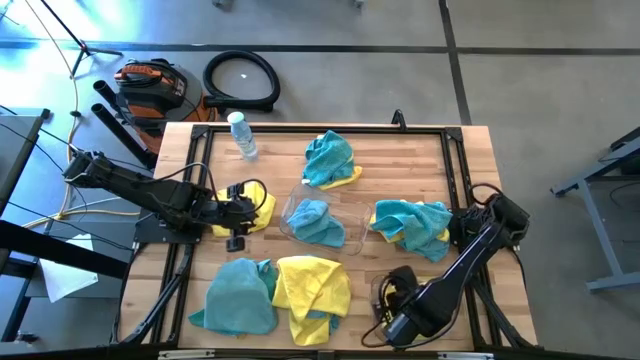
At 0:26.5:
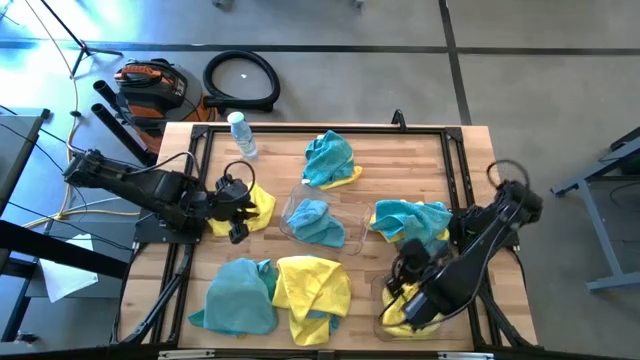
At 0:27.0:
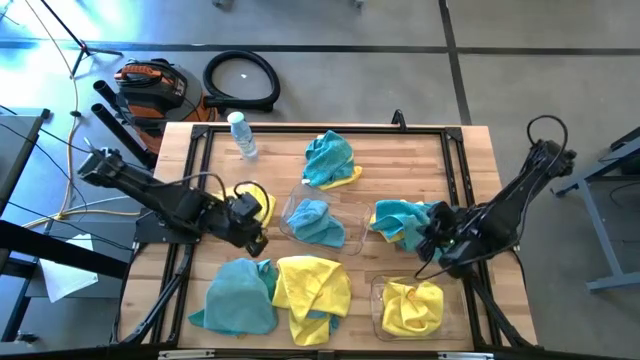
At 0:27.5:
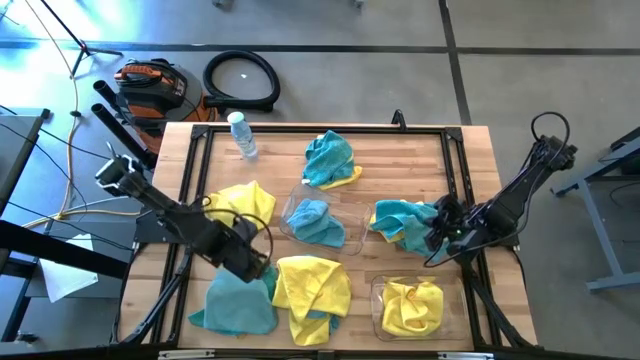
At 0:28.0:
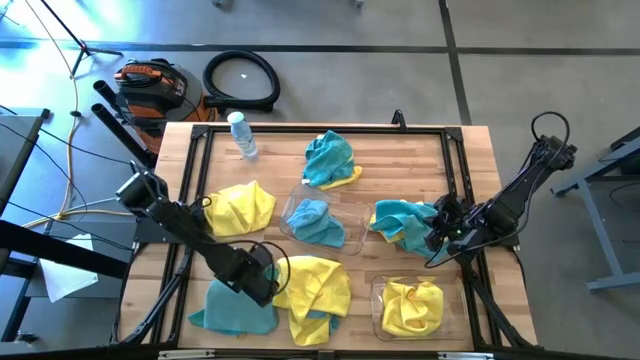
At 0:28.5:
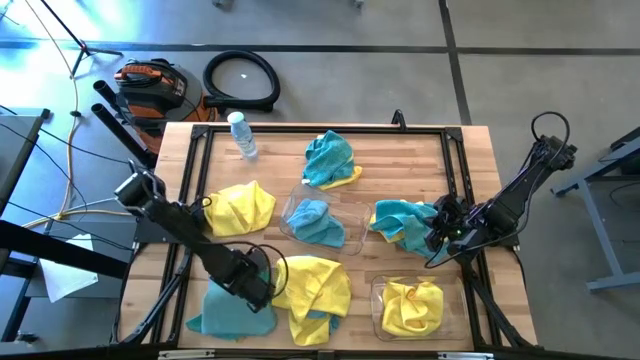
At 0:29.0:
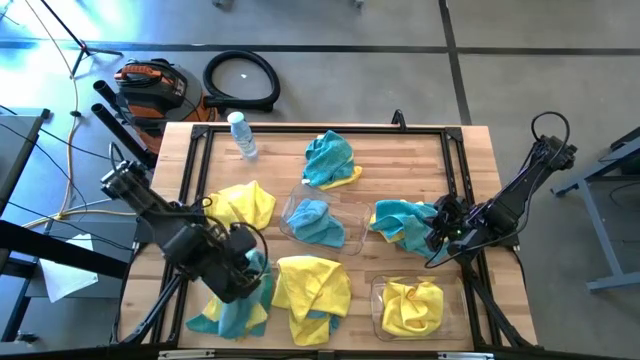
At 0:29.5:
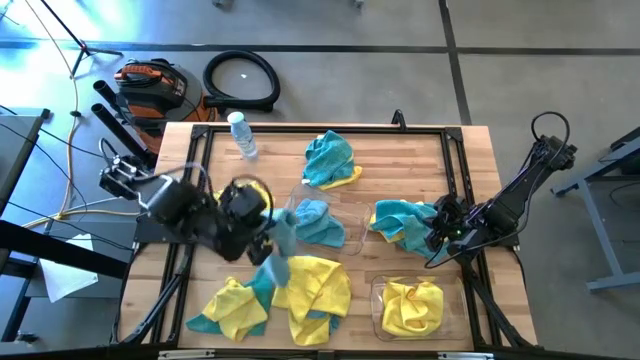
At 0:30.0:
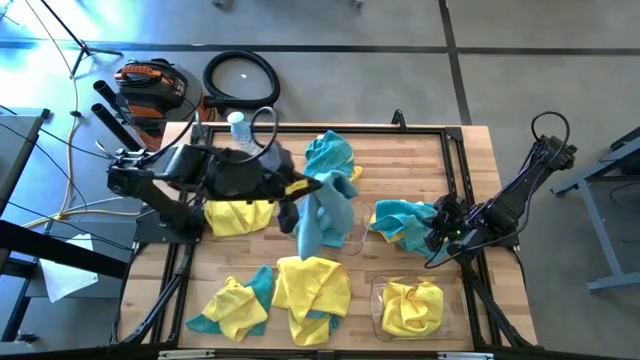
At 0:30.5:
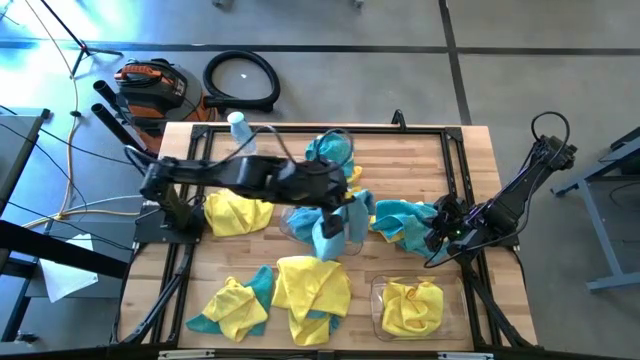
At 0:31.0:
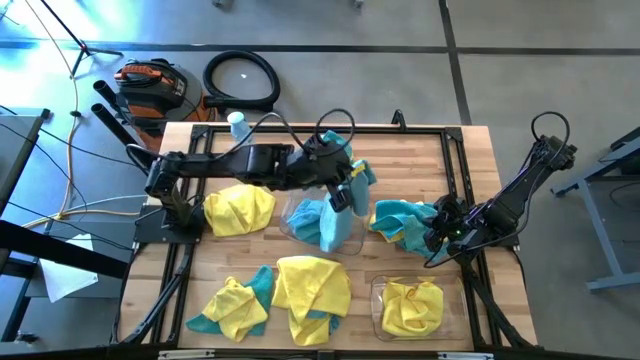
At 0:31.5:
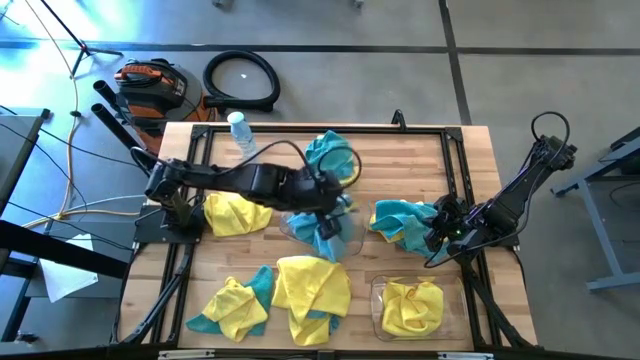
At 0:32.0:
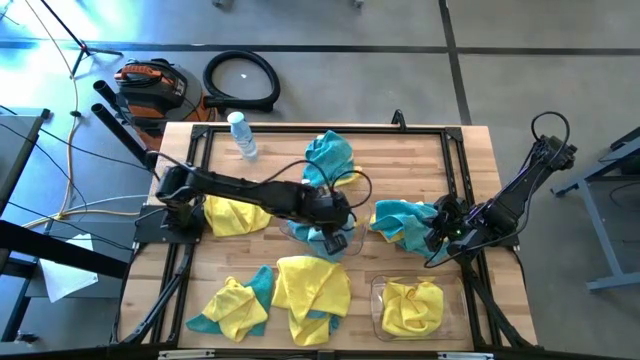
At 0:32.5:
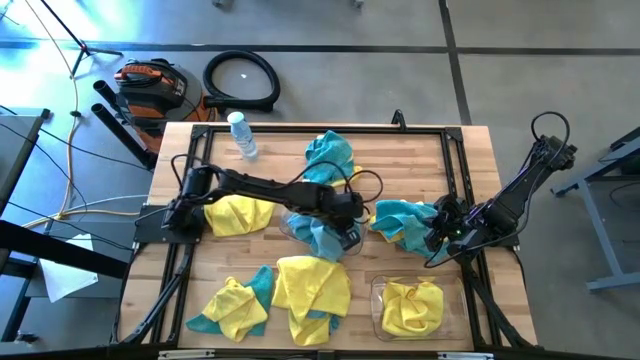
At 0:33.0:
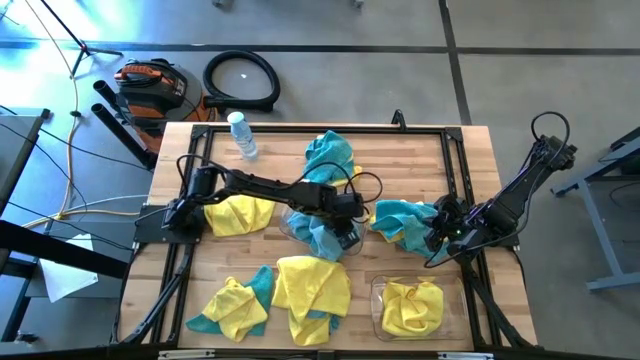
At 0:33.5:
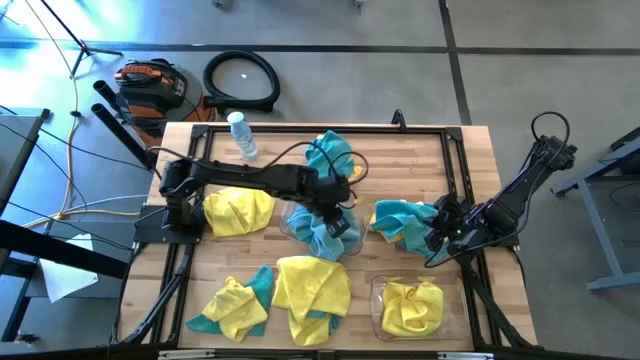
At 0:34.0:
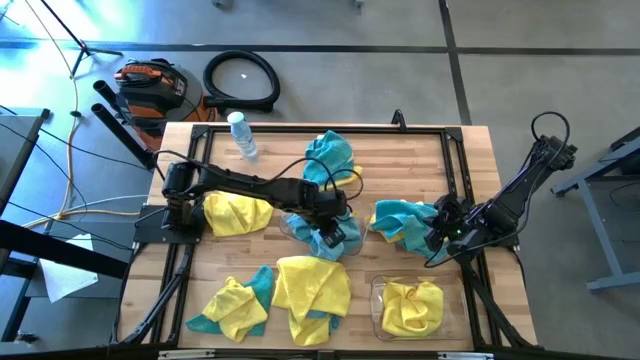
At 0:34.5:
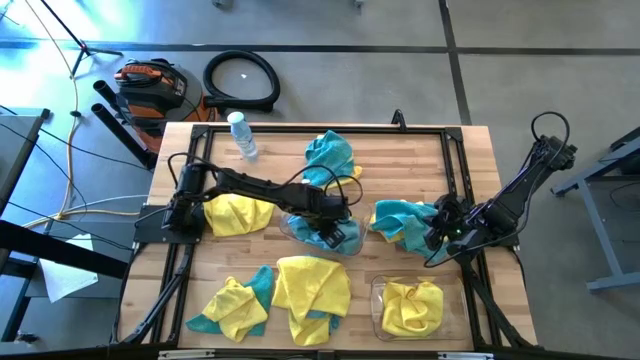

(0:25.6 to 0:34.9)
Task: Sort microfiber towel by color & place in baskets
Put the blue towel in the top transparent bin

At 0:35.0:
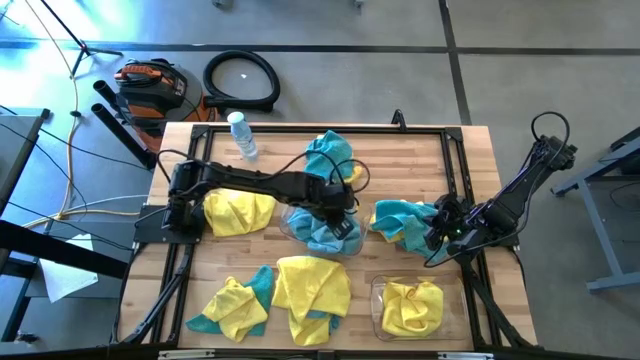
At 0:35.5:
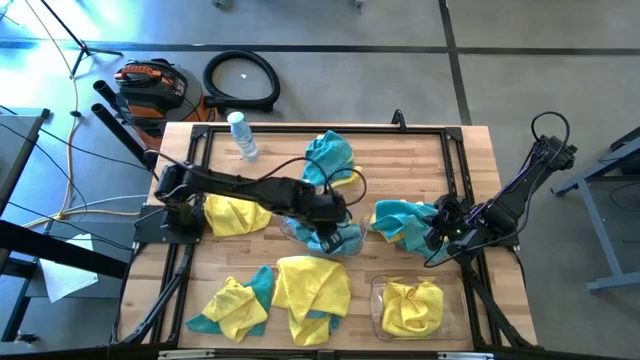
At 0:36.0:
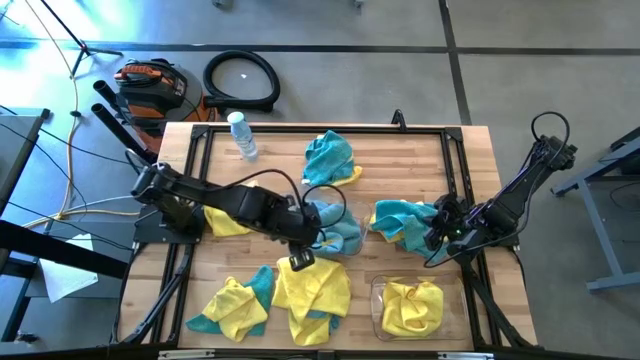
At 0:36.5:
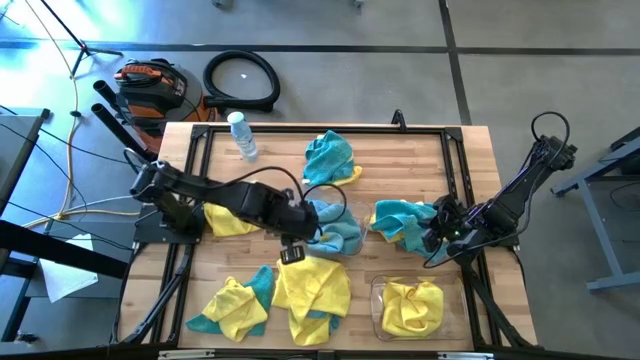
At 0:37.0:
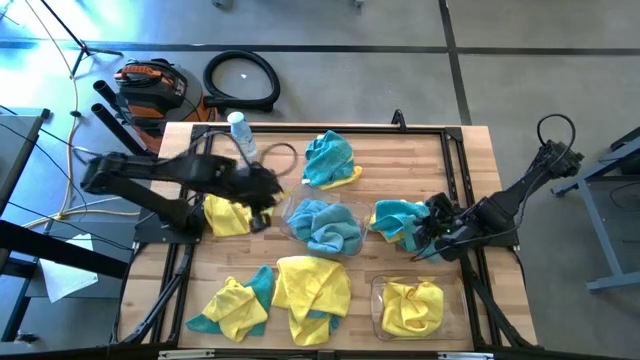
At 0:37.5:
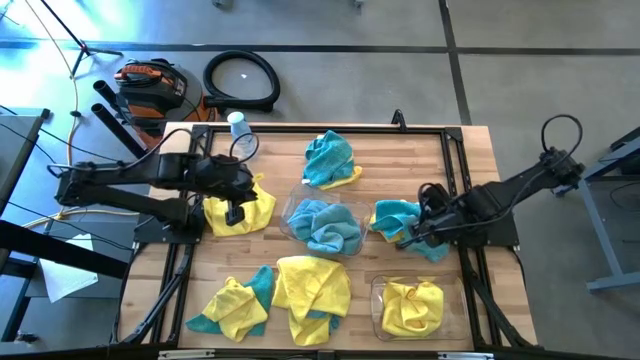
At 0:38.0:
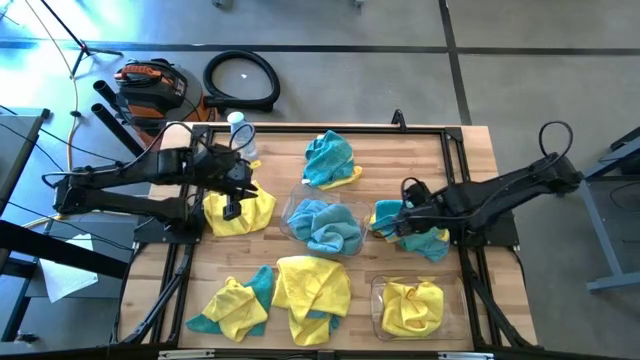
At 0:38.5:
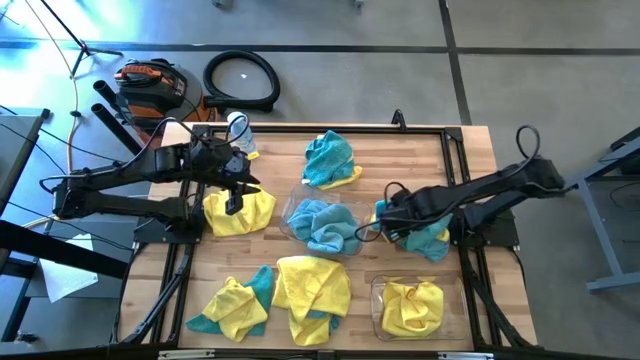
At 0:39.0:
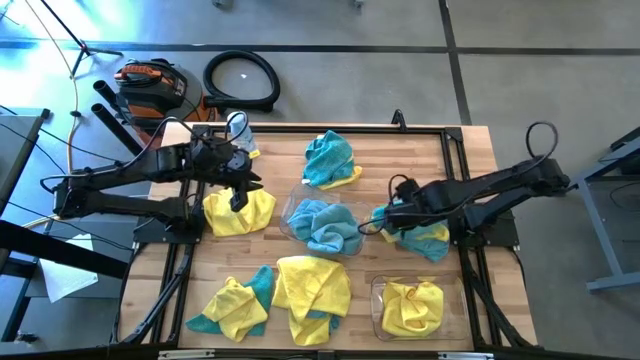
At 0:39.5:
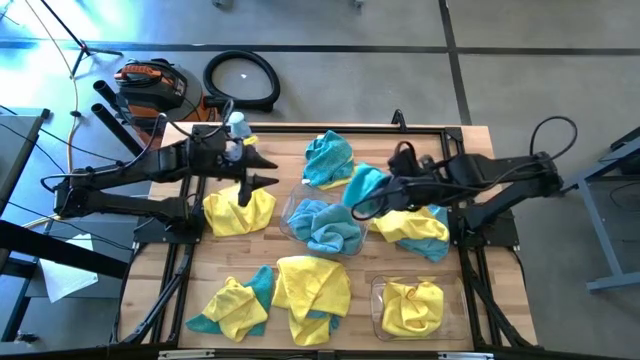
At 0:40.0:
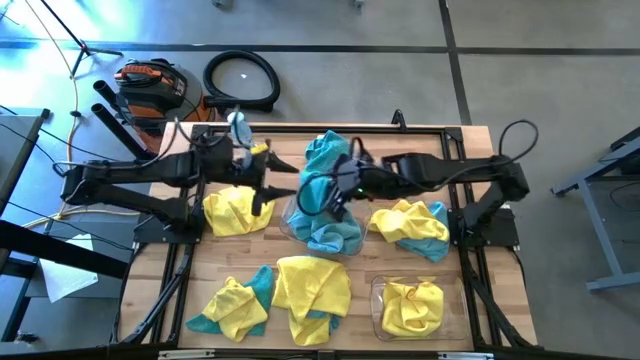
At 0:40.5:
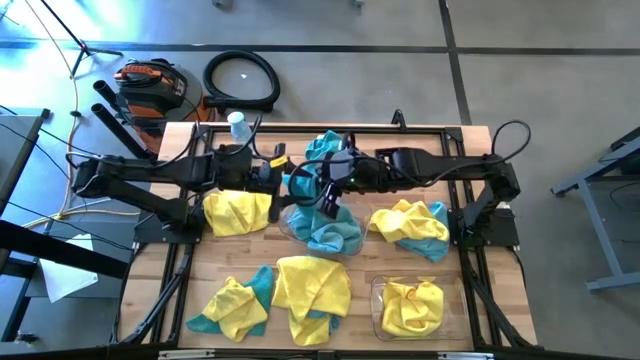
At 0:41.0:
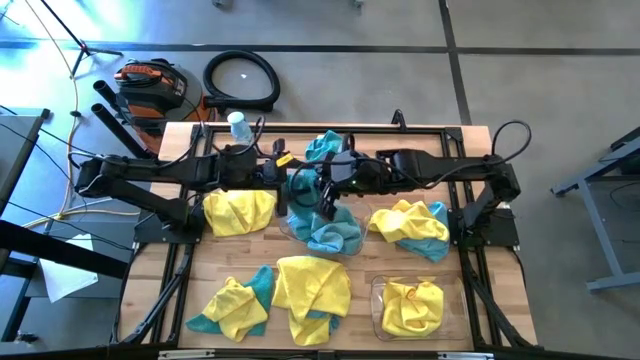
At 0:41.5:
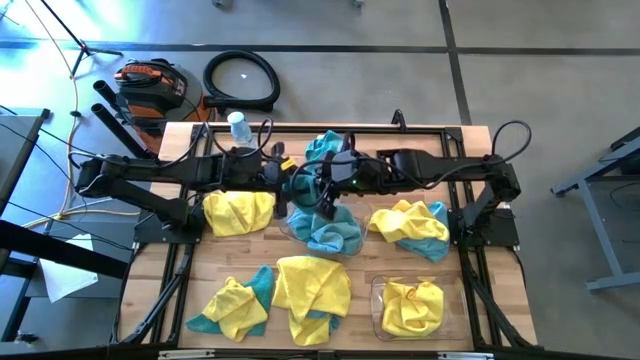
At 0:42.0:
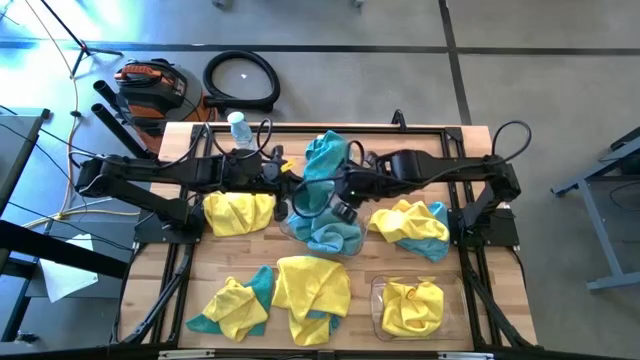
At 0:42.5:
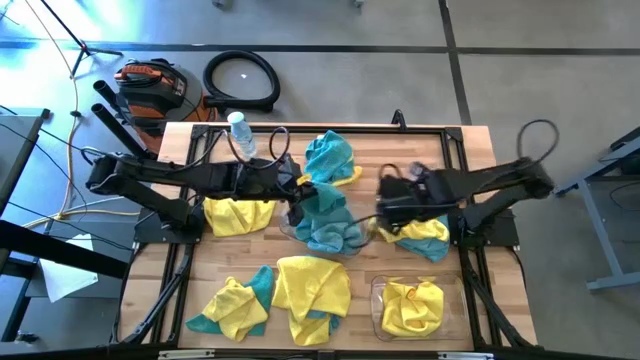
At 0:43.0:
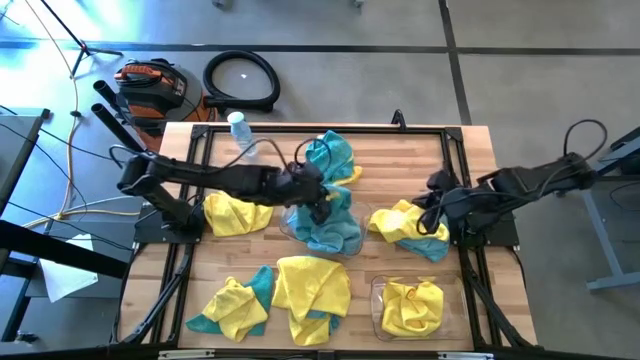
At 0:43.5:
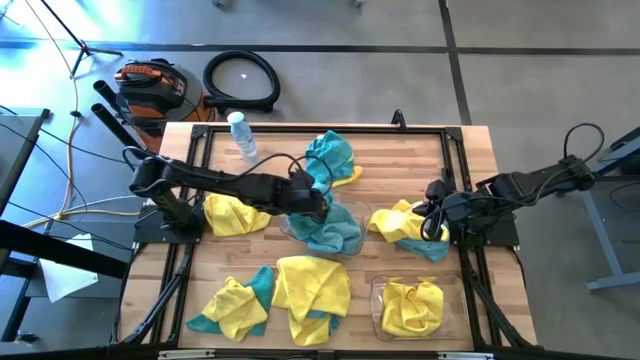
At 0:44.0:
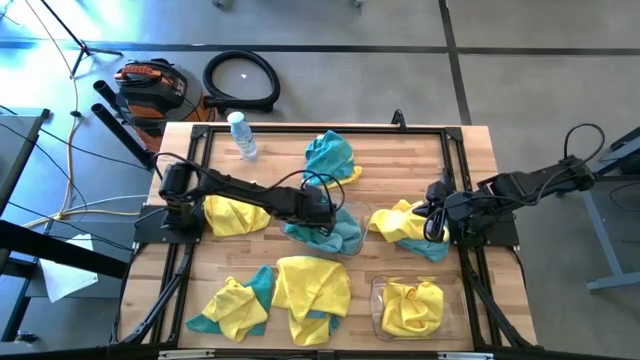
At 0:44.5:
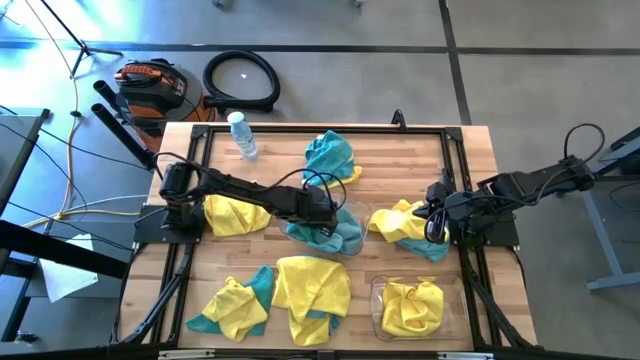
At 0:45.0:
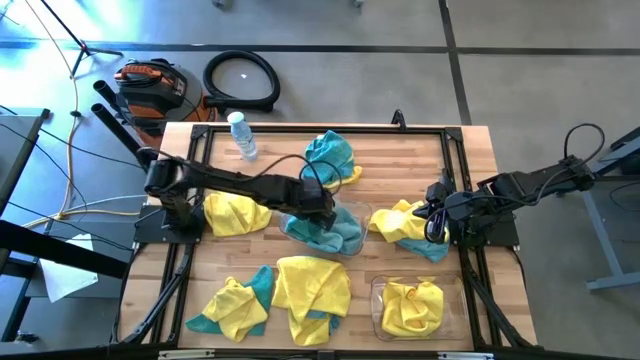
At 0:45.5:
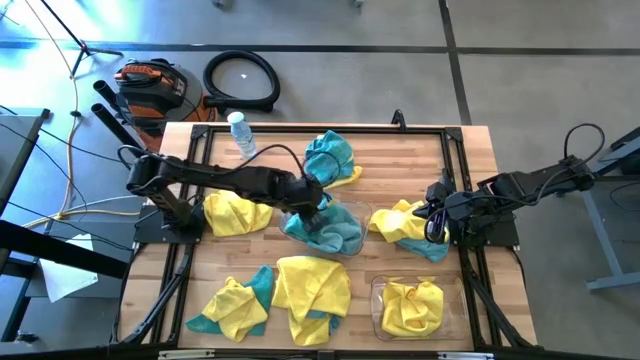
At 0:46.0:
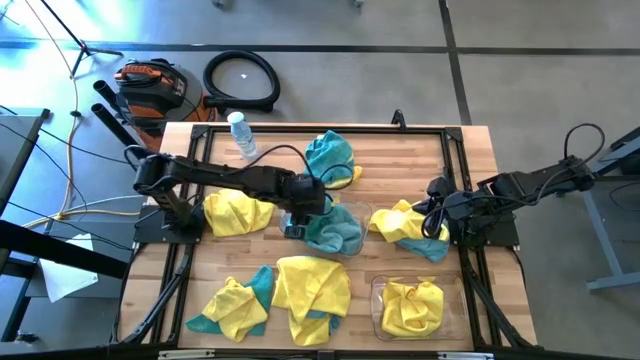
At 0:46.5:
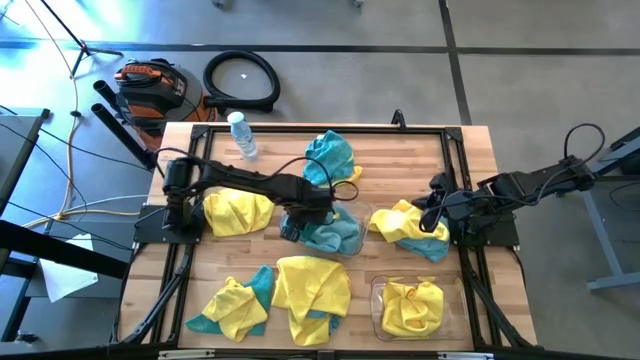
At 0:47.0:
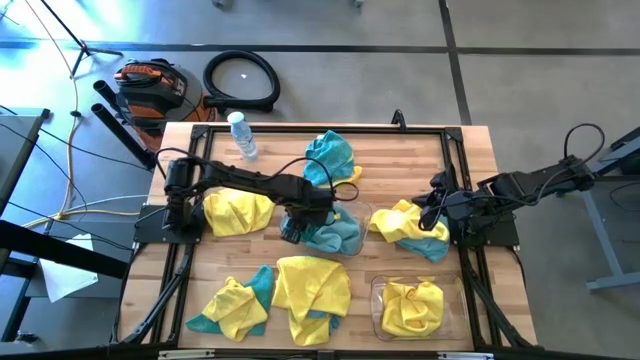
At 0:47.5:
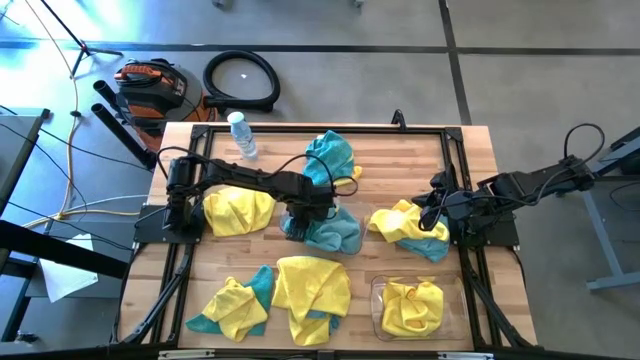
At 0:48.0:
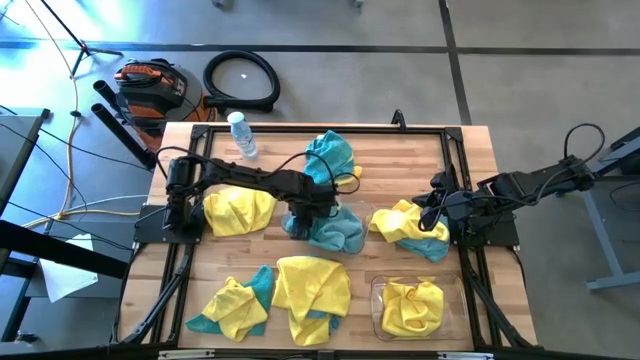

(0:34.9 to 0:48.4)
Put the blue towel in the top transparent bin
